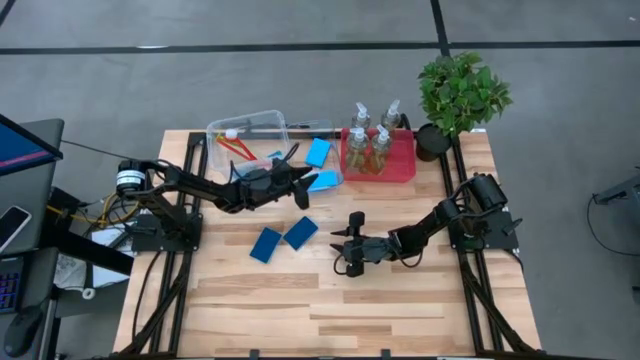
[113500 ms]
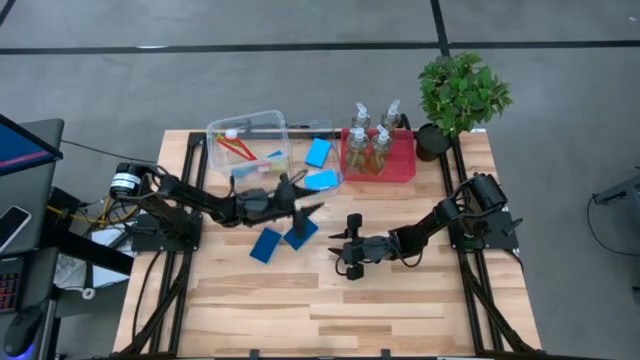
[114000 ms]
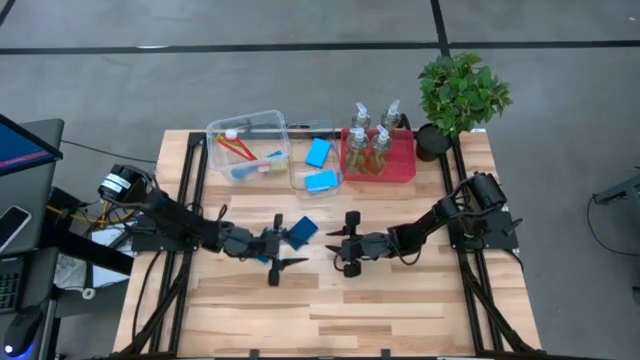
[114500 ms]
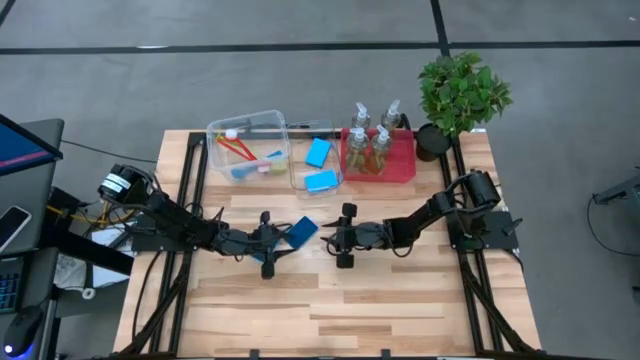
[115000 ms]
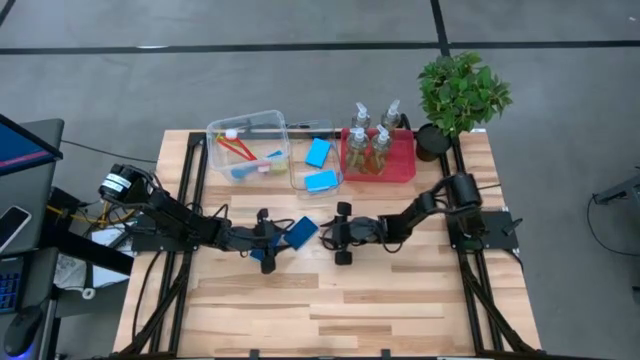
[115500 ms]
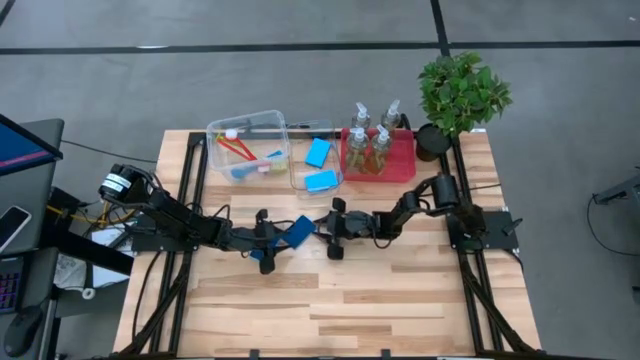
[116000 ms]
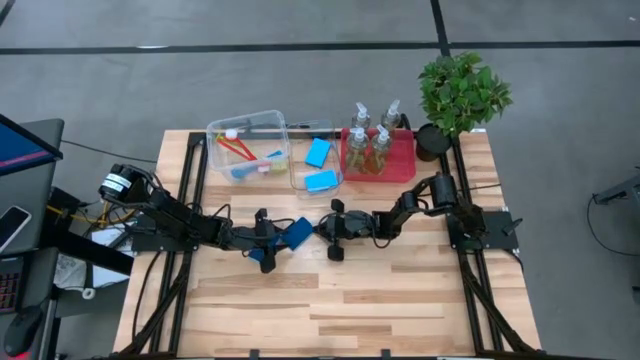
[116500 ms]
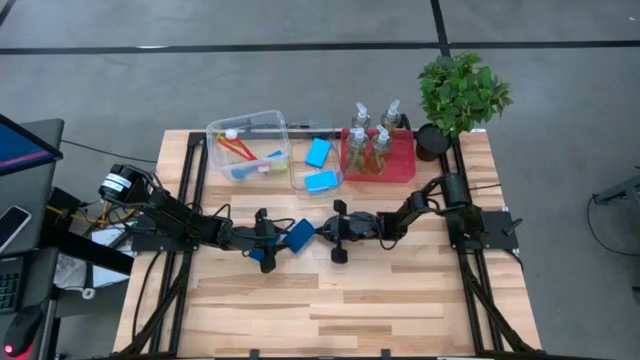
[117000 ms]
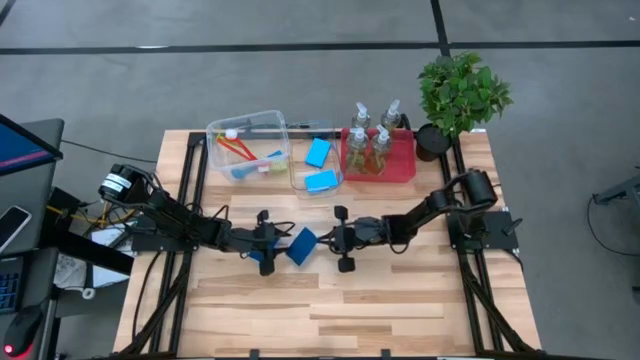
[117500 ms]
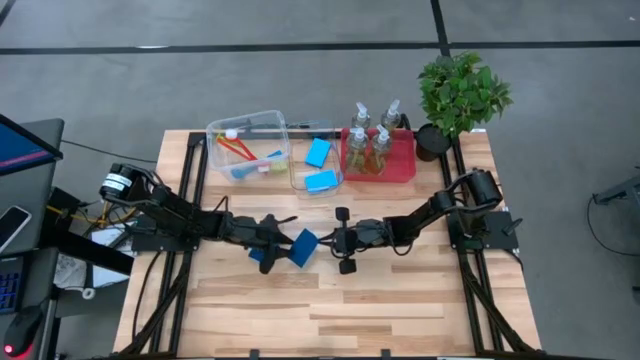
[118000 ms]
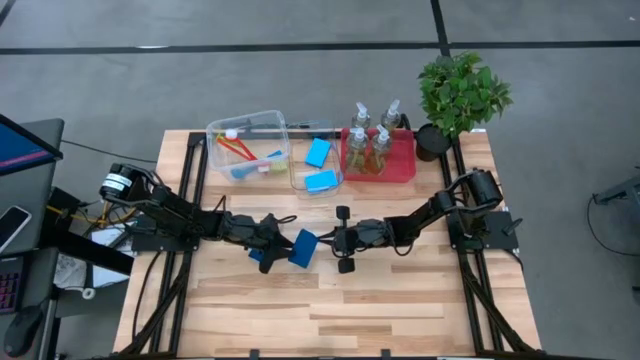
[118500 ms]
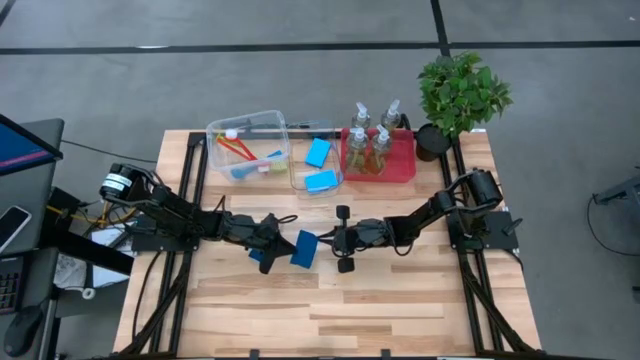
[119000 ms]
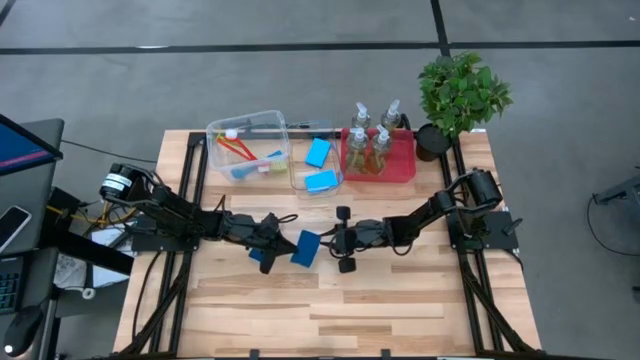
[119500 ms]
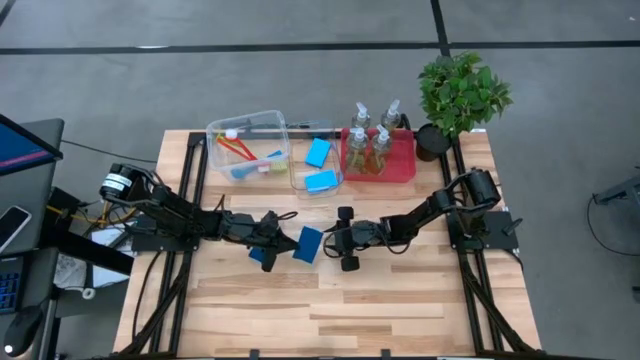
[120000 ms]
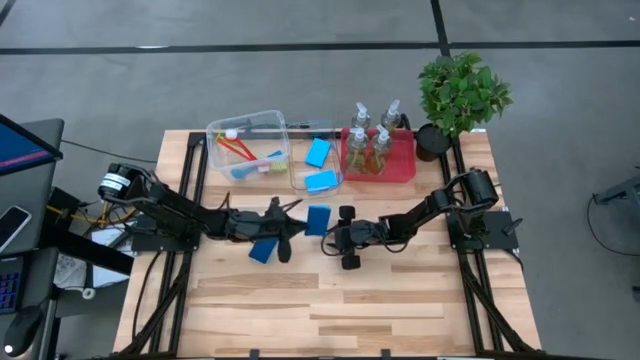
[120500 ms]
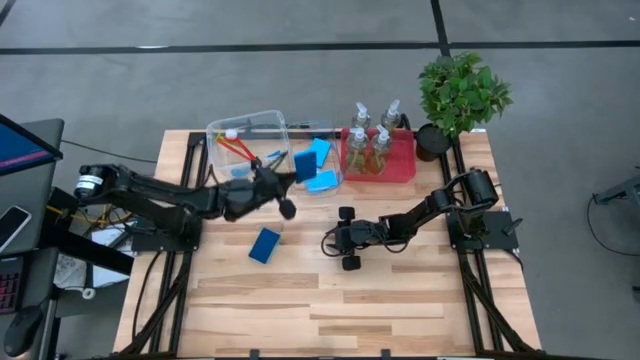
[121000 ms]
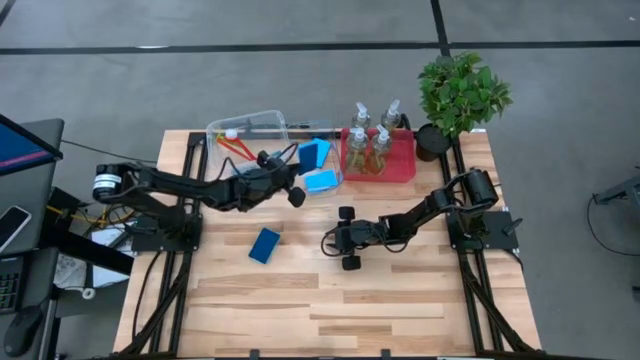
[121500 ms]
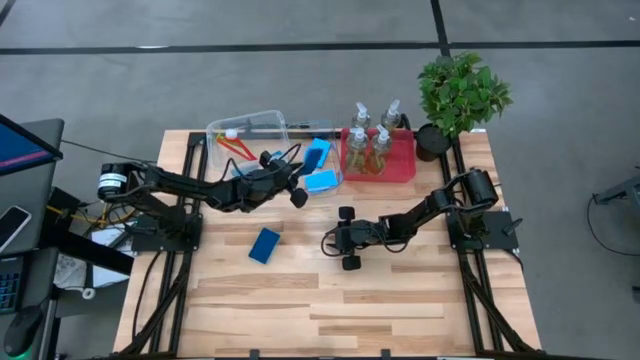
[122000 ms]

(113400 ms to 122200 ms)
Task: Pick & Place Kitchen Sink Supplies
Put the blue sponge into the transparent bin

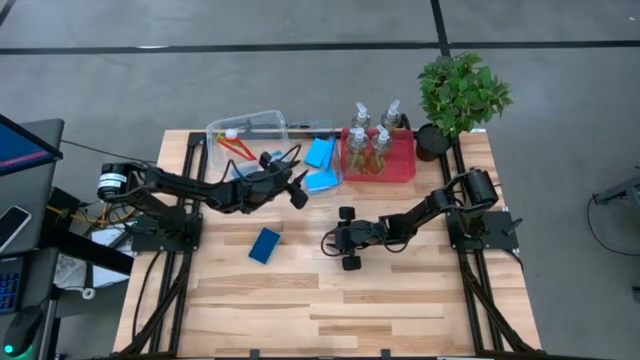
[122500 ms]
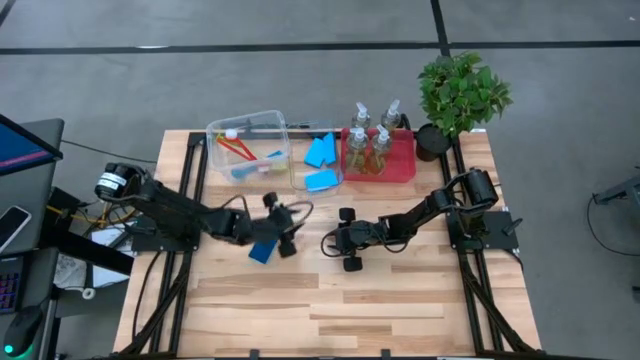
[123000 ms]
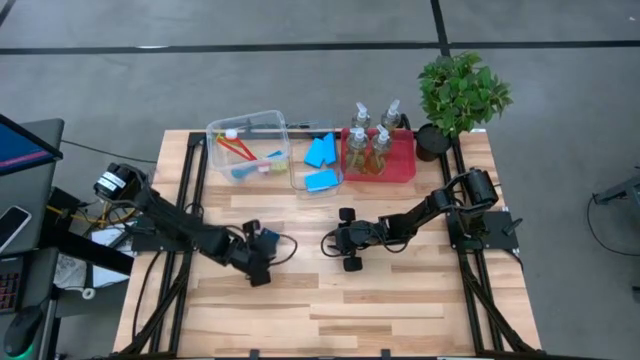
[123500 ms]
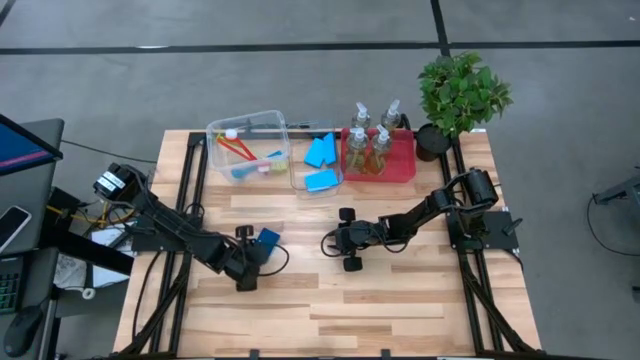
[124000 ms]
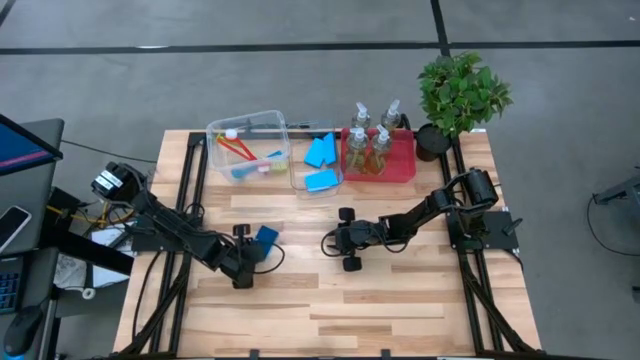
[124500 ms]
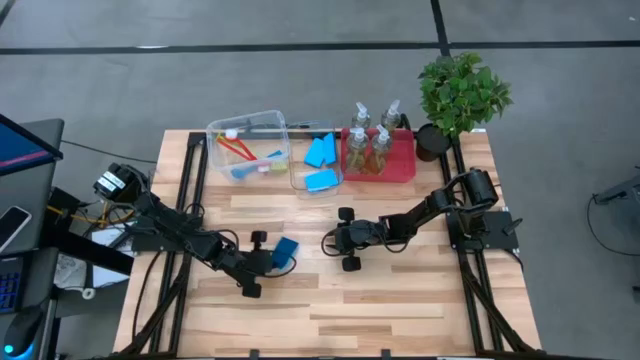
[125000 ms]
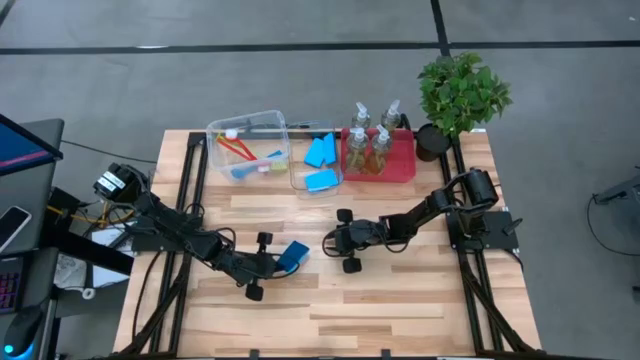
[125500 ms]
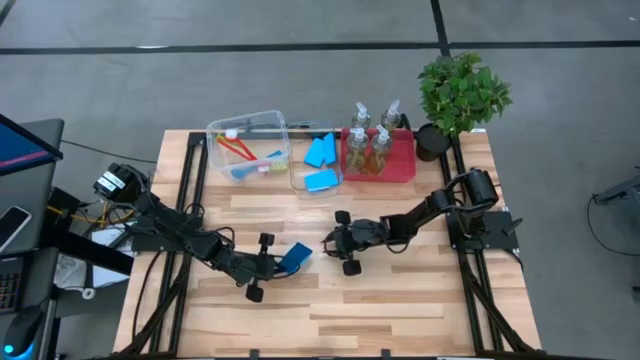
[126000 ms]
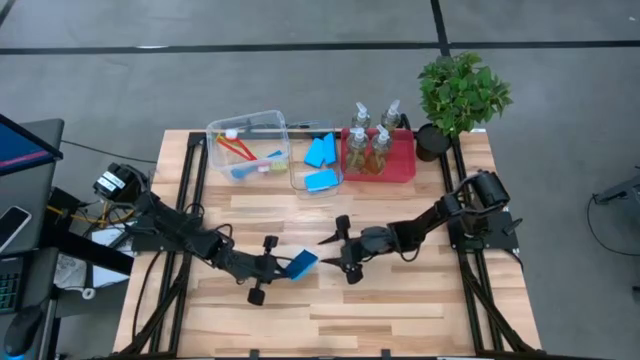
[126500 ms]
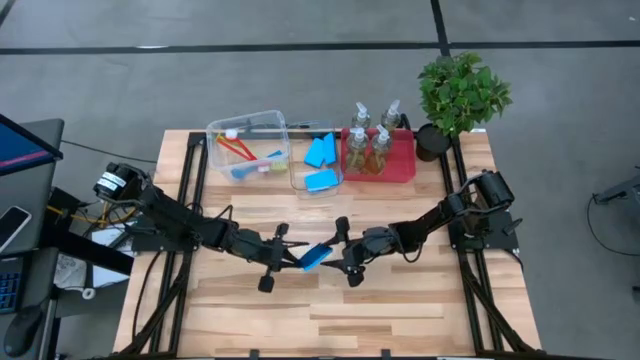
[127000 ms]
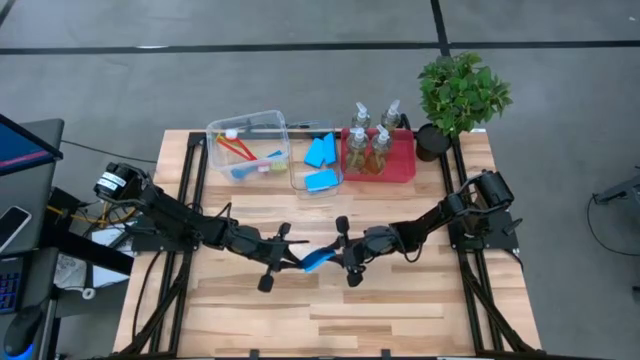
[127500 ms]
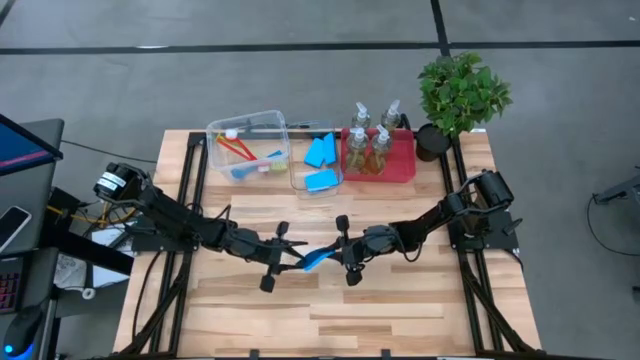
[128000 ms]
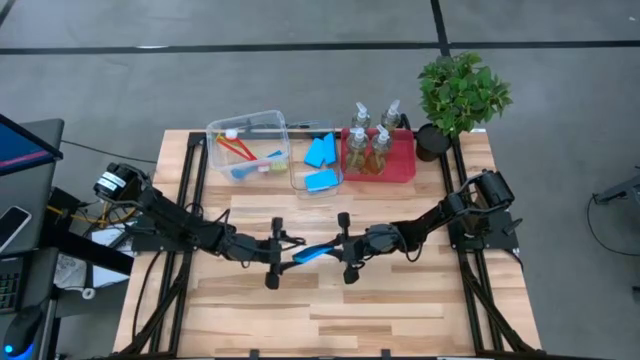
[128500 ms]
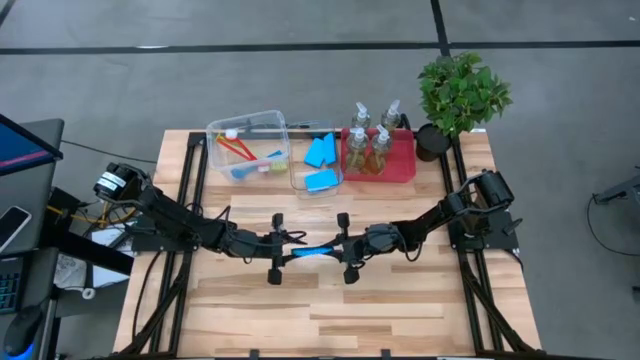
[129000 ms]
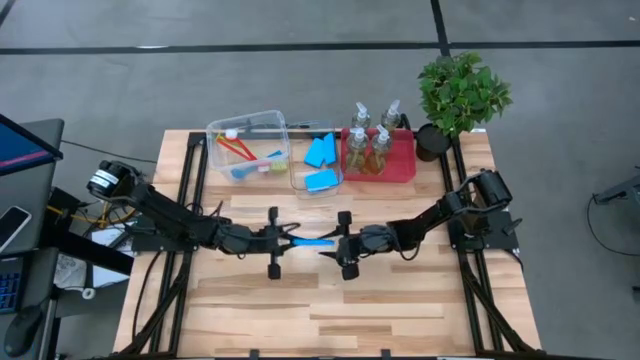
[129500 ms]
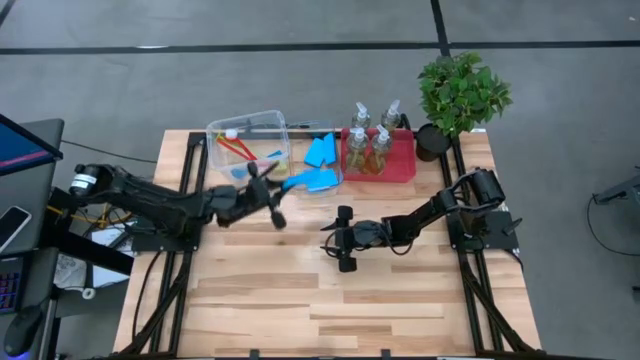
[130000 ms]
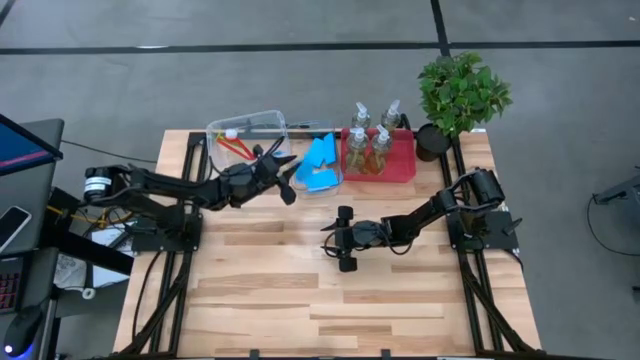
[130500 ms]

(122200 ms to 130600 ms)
Put the blue sponge into the transparent bin

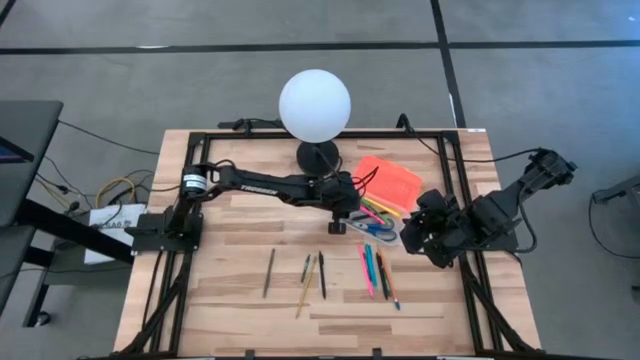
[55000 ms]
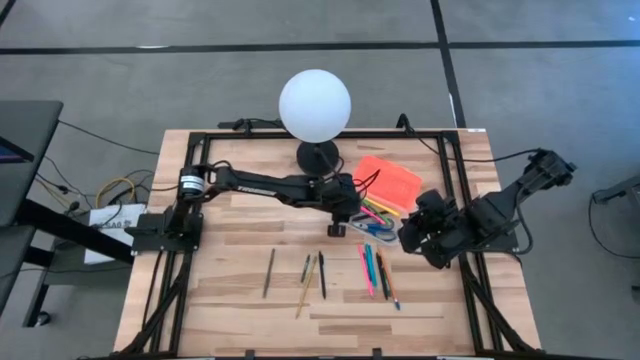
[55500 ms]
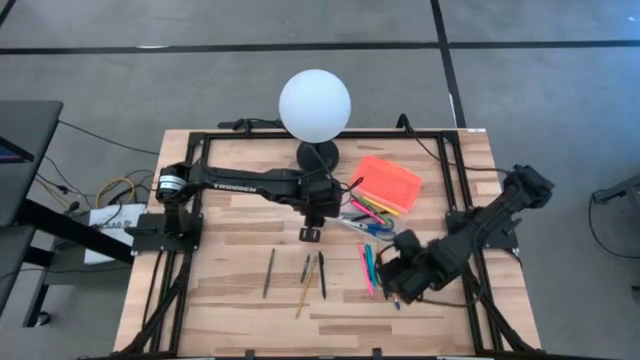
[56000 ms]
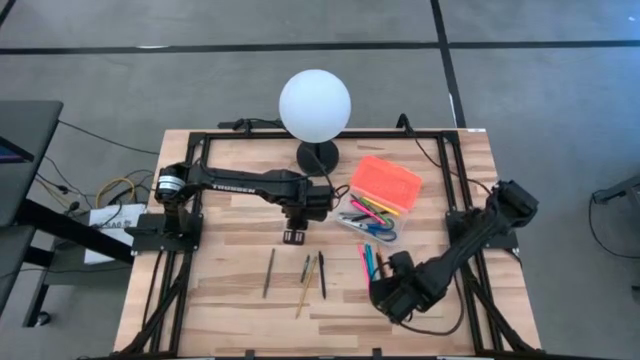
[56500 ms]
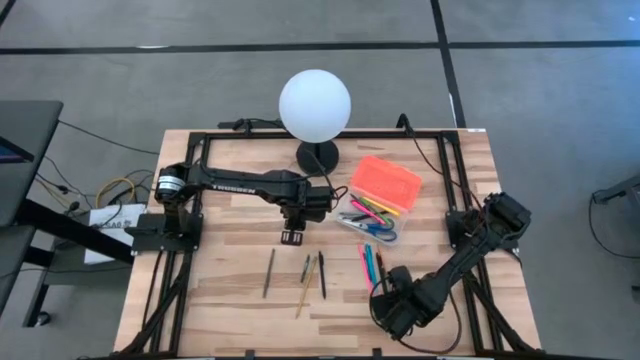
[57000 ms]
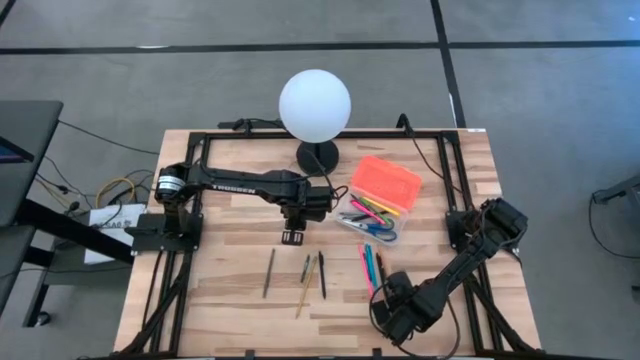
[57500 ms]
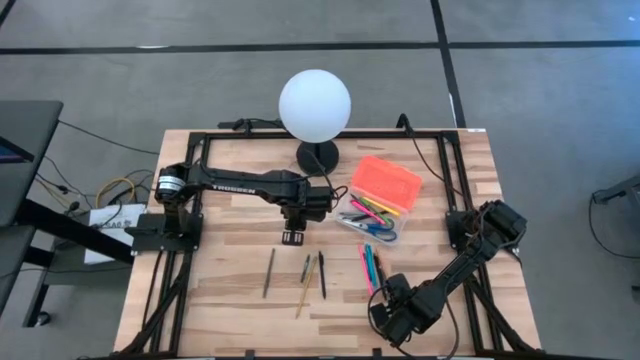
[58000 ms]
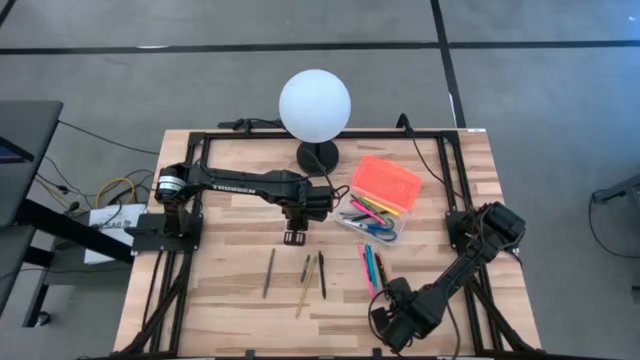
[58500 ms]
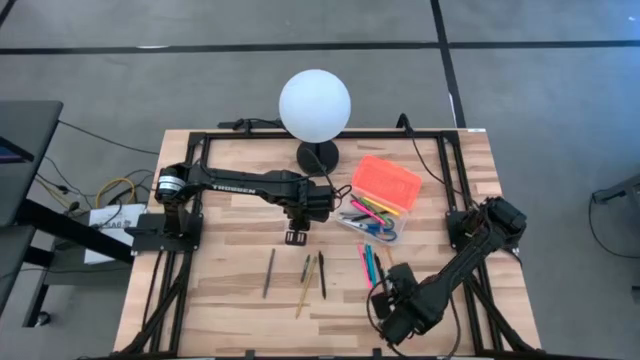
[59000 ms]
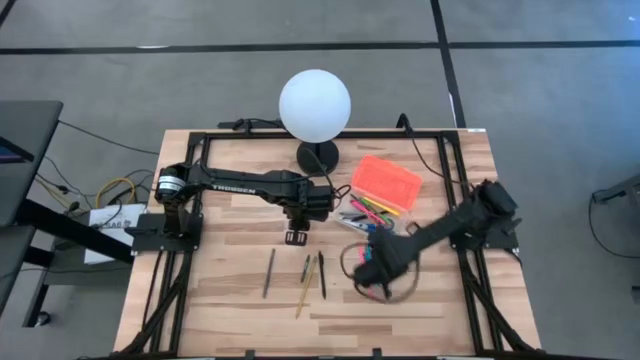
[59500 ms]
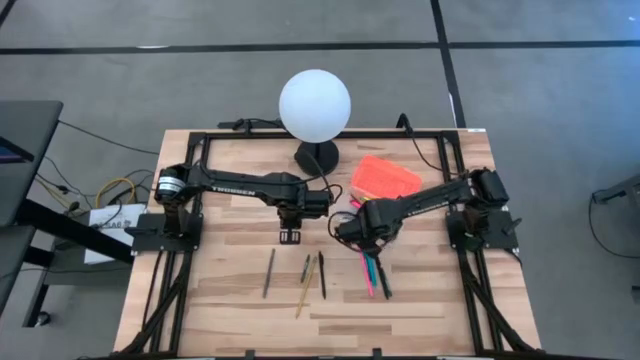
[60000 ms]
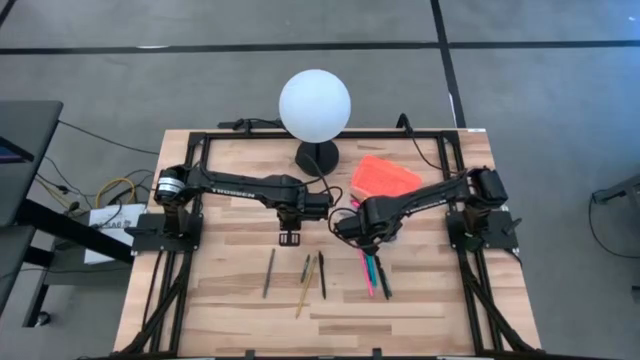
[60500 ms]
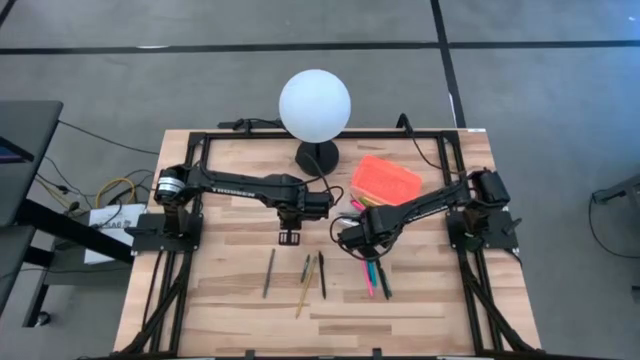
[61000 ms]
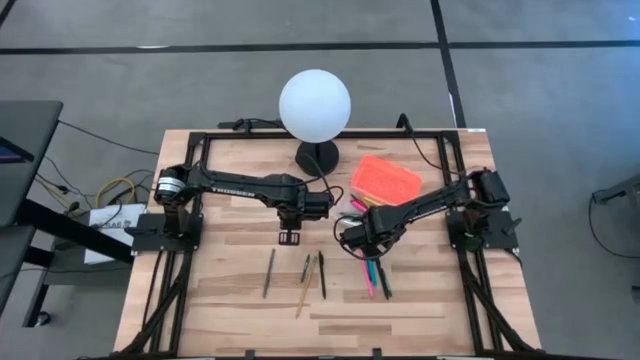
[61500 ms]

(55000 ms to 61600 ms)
Task: Pick & place school supplies into a supply box
Put the orange pencil into the orange supply box
